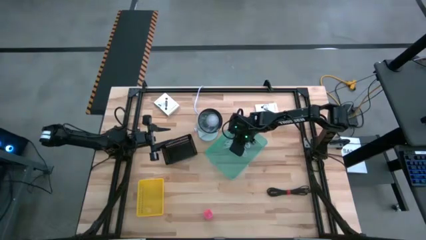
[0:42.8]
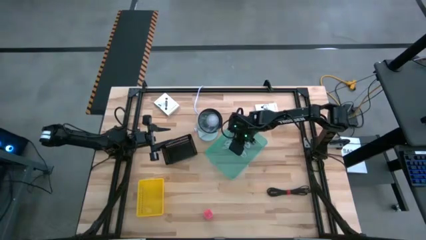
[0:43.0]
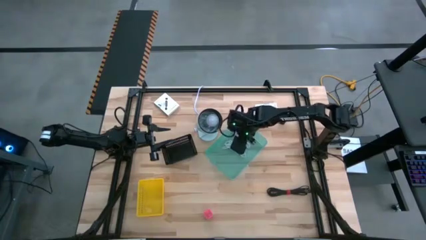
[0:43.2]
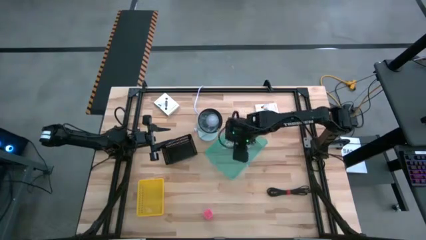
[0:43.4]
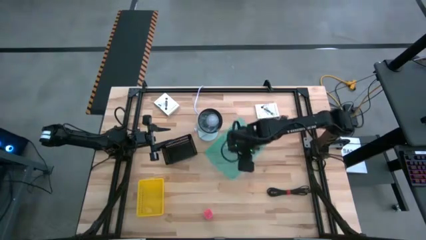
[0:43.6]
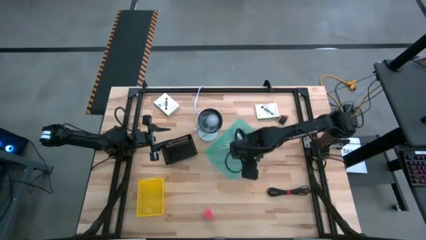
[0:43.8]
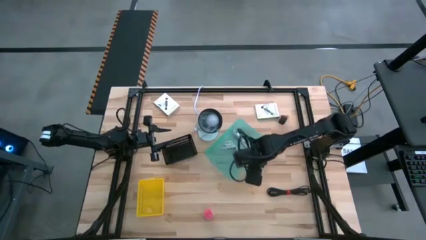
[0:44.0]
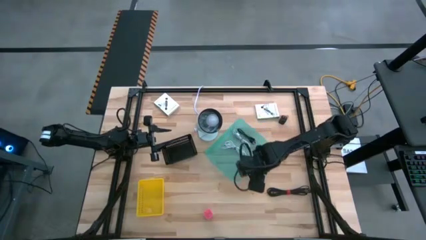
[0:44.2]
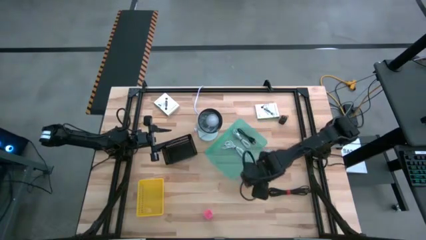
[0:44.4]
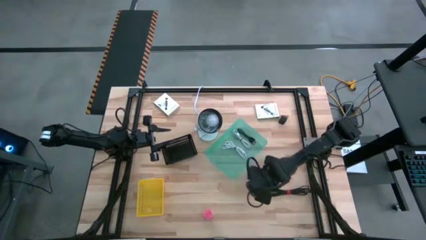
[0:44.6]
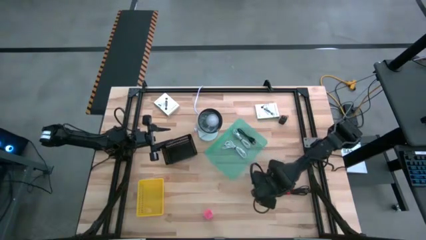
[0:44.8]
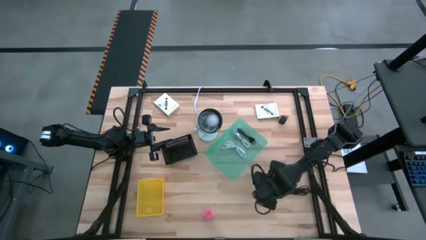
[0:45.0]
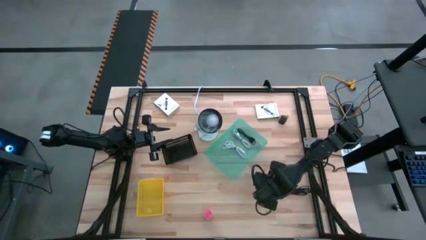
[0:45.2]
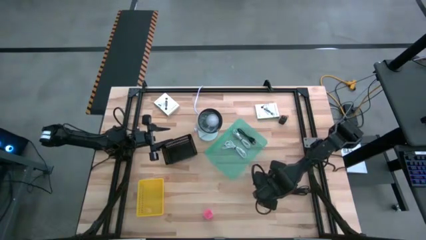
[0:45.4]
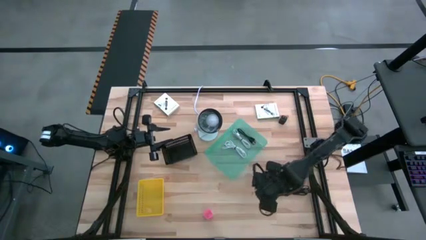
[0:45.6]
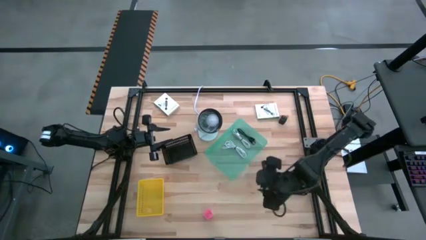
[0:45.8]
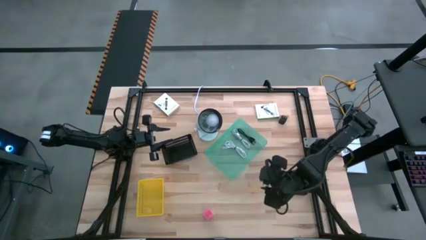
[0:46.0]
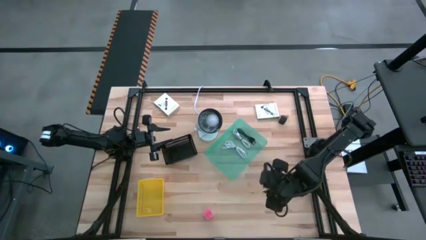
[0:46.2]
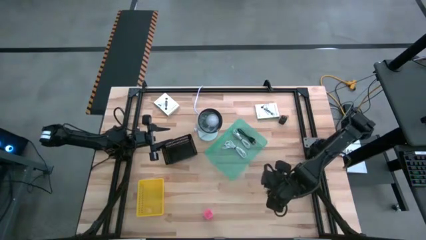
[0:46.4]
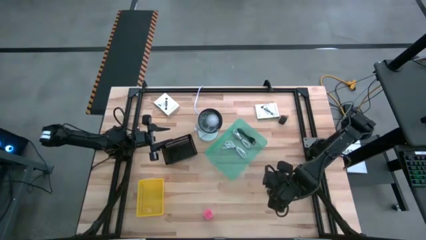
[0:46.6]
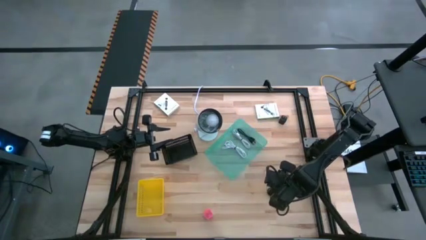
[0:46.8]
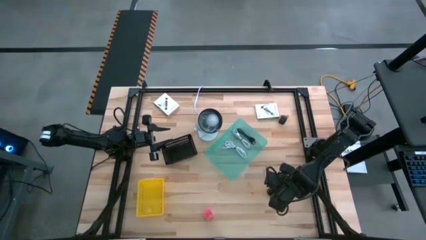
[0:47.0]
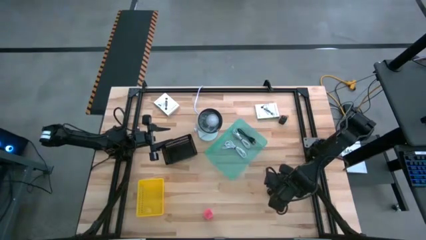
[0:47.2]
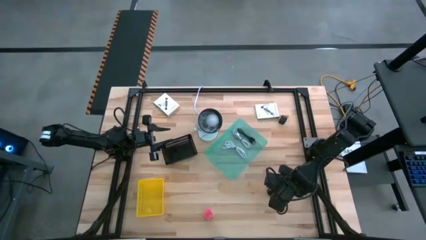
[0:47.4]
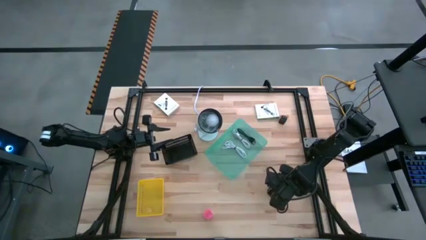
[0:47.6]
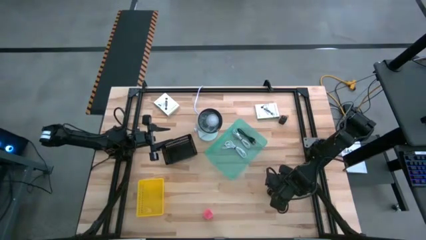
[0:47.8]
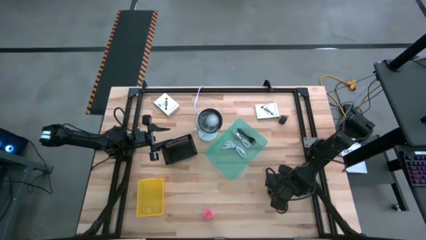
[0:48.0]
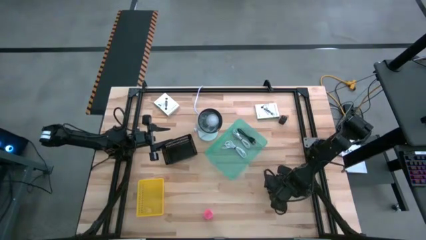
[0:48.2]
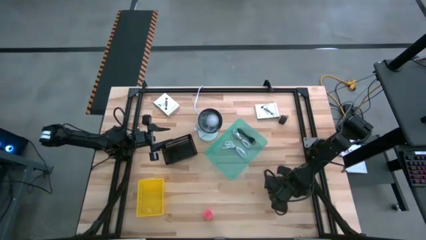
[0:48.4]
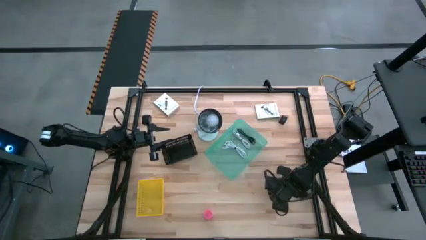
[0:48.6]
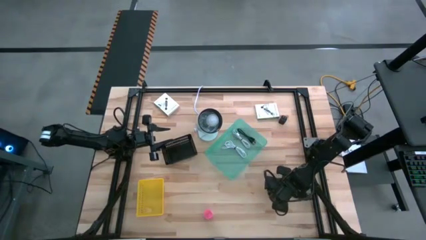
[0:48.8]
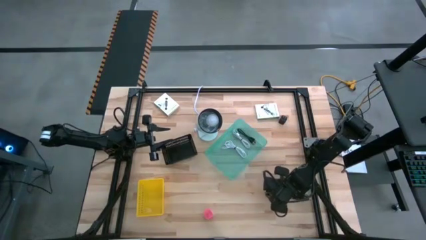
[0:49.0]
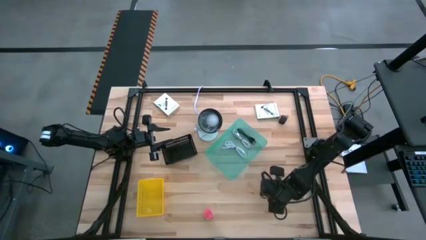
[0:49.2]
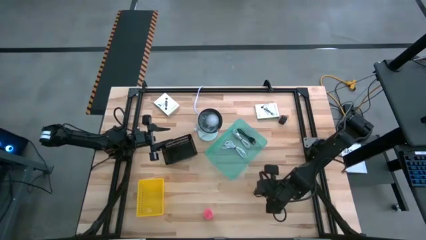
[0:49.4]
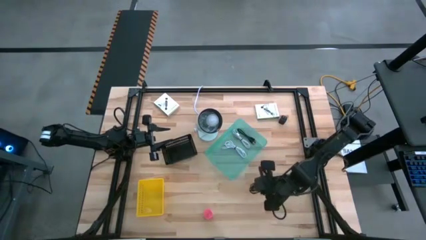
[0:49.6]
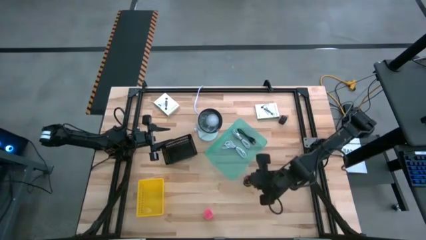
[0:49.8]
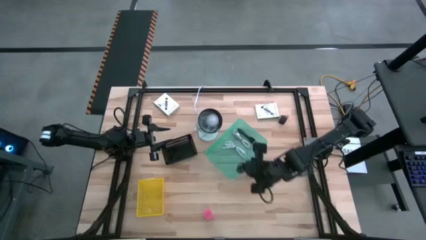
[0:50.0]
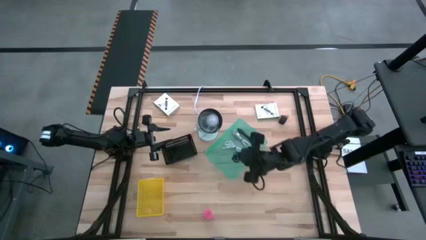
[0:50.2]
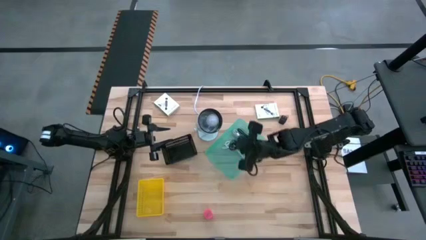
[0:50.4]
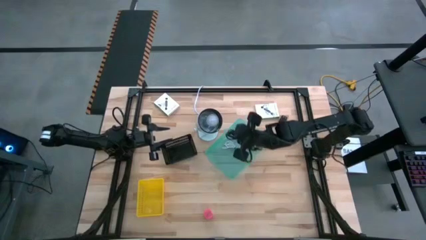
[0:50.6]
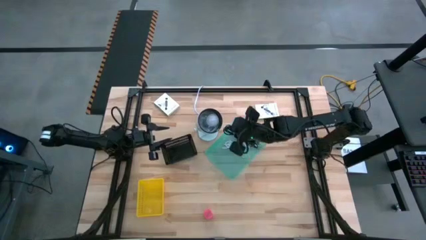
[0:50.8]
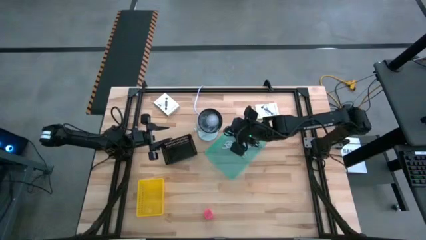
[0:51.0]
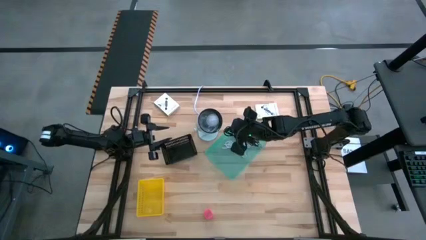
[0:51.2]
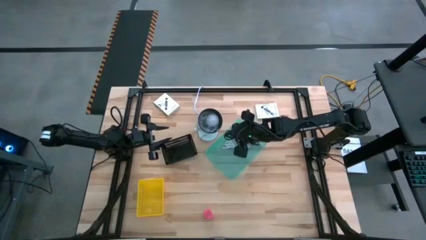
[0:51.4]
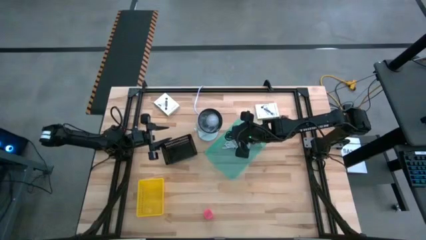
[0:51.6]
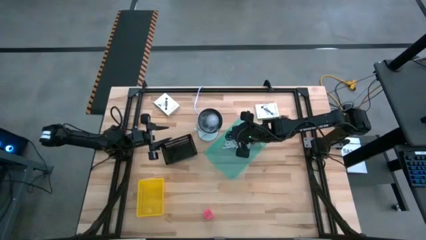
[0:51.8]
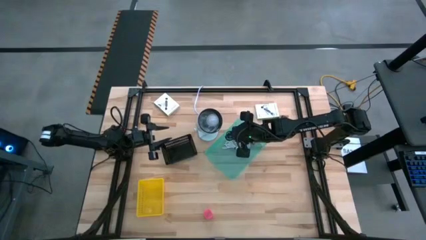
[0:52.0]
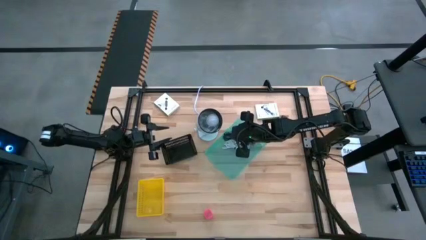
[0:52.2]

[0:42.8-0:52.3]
Task: Pick and place items into bin
Put the black charger cable into the green bin

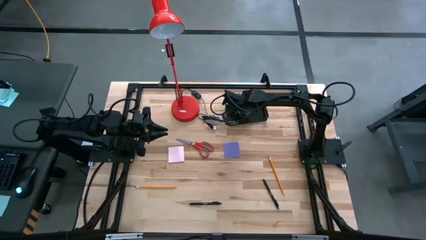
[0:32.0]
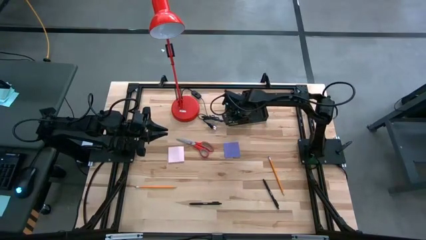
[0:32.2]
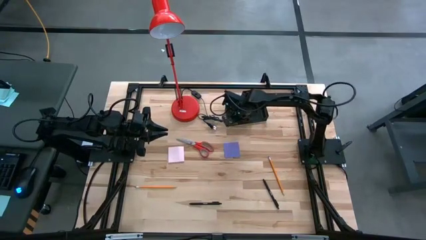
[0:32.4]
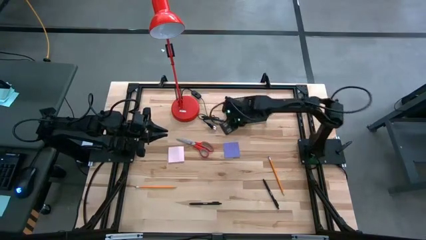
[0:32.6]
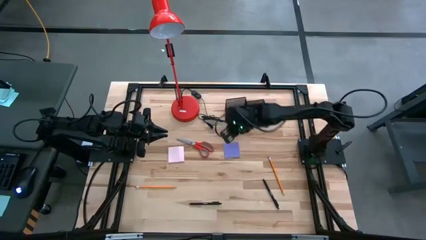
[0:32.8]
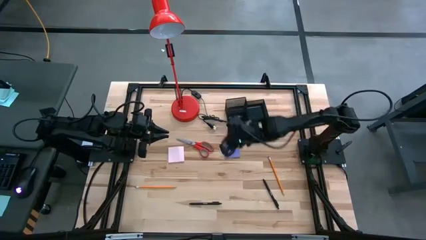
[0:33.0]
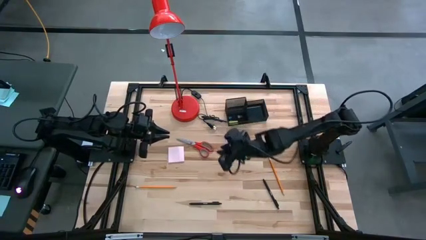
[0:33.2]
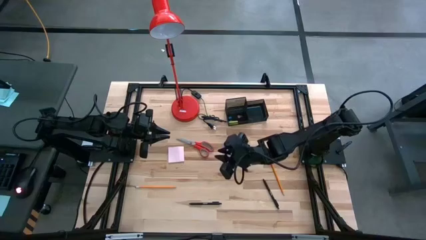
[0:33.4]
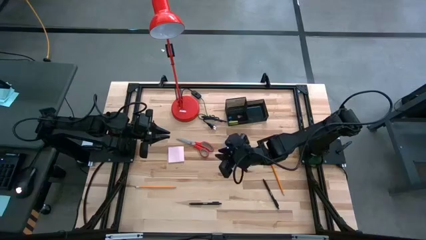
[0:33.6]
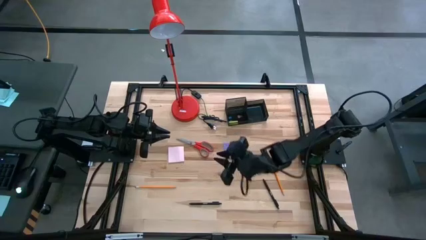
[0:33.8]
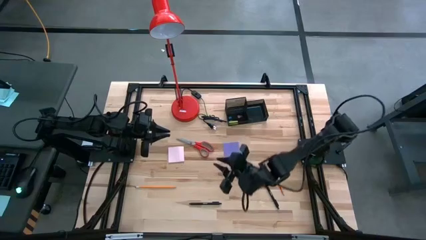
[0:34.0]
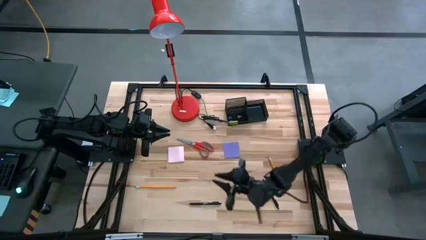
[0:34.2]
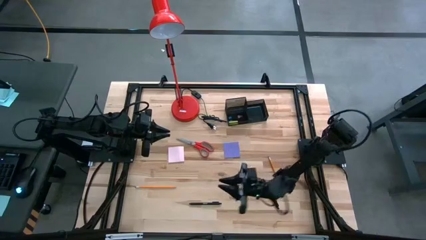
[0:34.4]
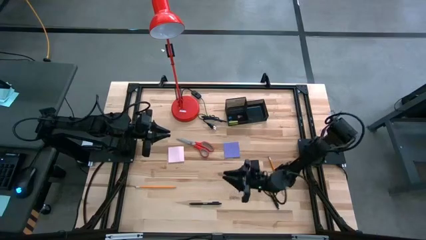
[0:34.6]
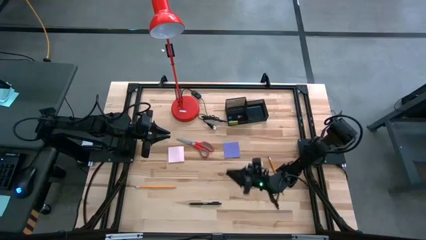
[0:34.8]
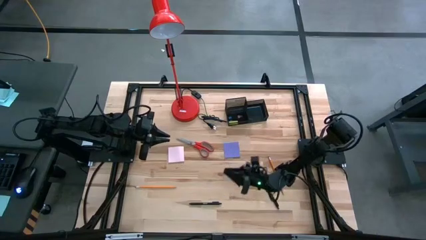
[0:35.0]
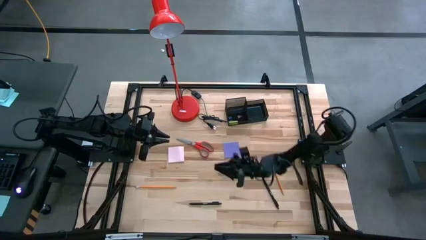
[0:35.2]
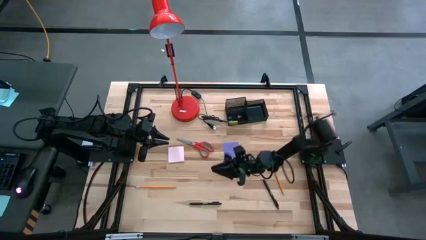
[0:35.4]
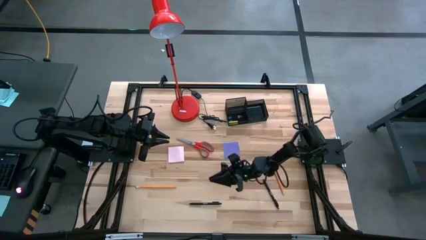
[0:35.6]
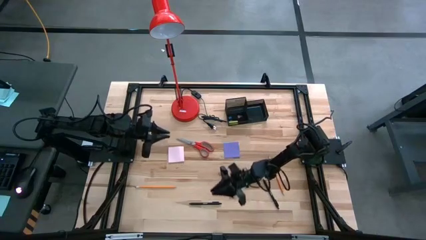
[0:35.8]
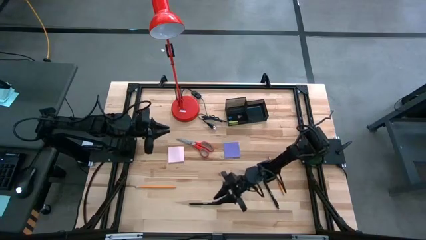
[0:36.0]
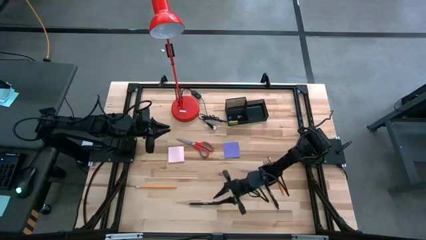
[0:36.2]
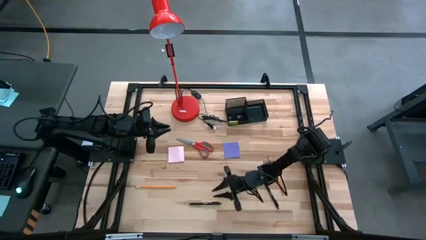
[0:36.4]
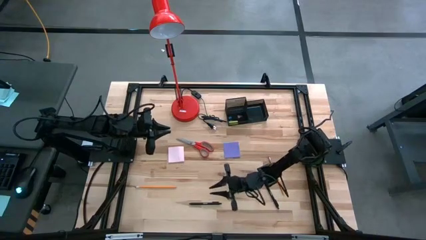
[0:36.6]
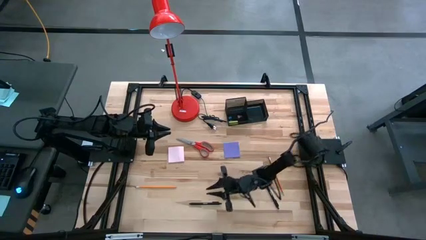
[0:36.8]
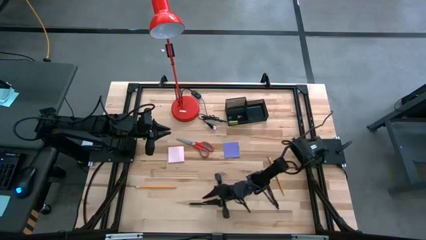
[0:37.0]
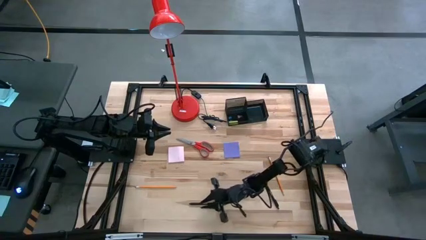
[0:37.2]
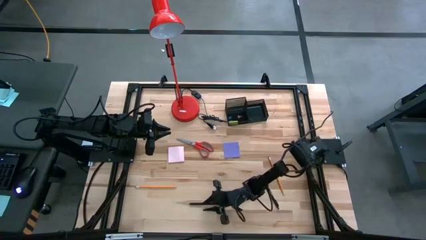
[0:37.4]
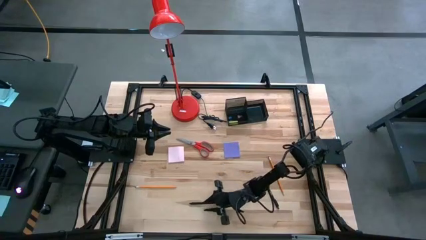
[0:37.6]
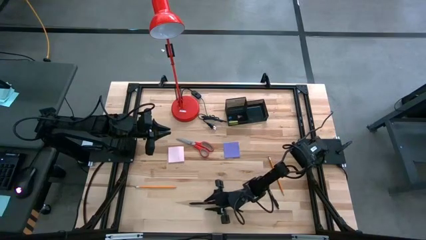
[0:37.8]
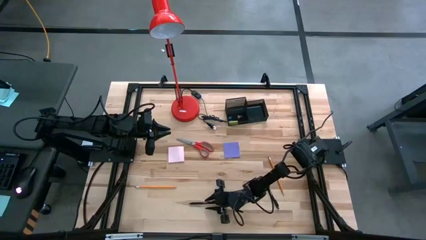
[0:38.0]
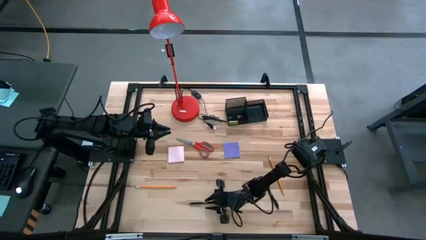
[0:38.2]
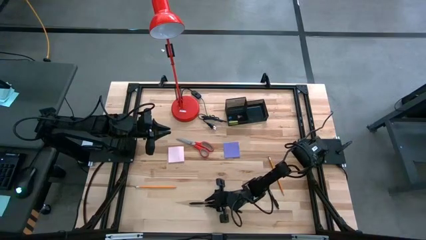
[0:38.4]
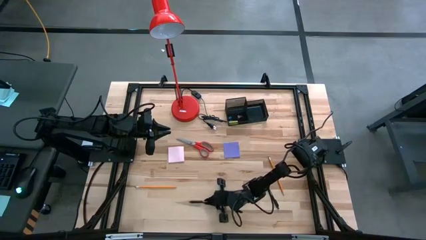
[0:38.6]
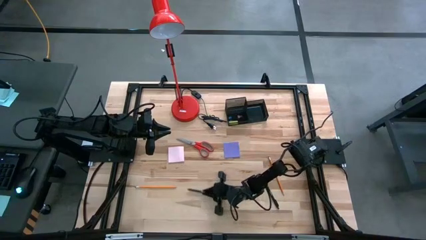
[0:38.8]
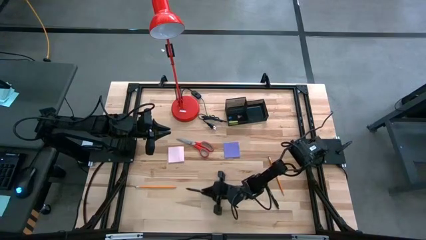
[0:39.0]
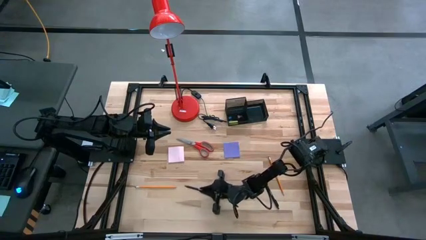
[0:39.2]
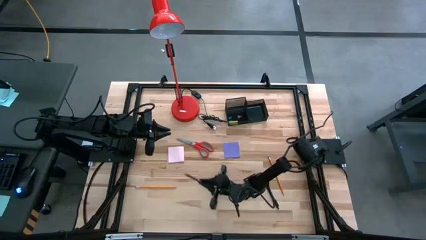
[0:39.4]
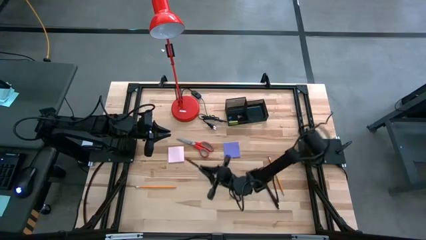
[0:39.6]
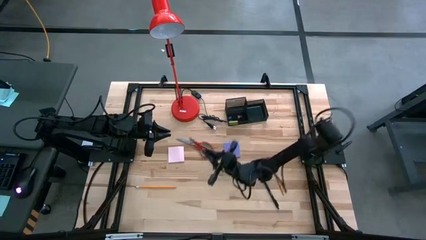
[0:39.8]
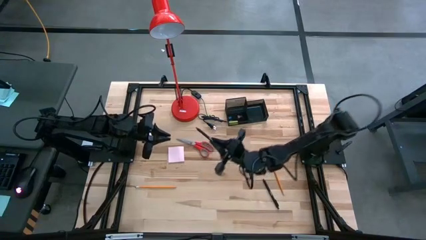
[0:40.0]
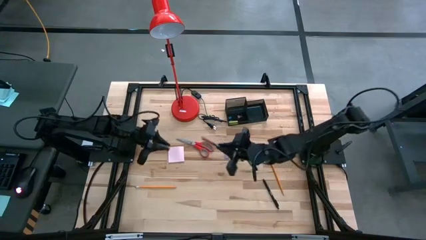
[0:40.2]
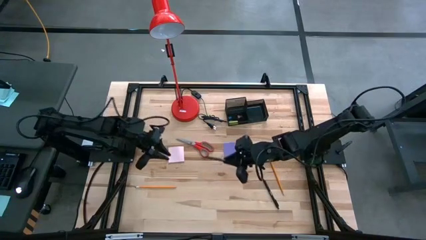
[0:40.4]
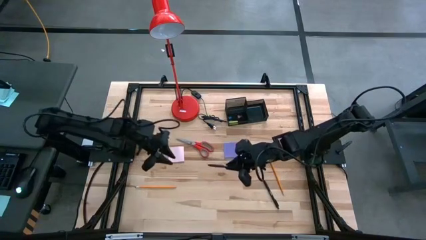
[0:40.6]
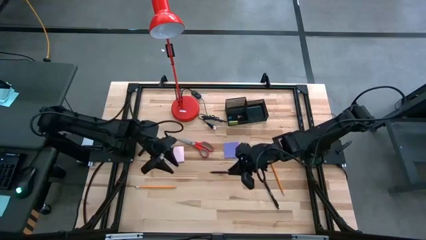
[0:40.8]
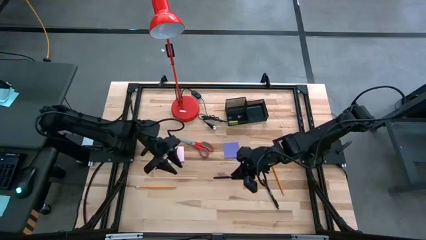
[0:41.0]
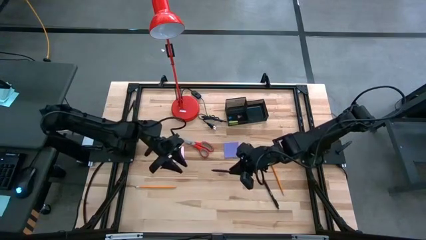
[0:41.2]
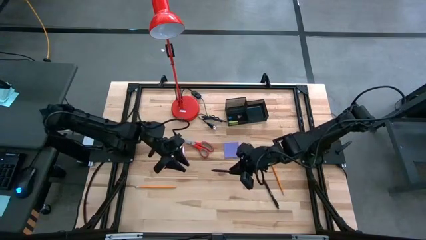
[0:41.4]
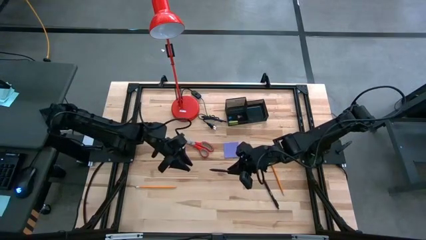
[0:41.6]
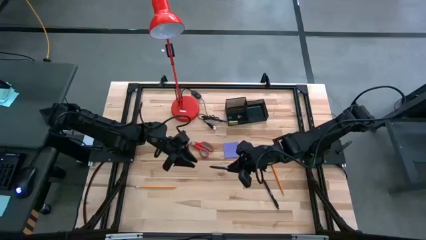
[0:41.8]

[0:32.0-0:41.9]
Task: Pick and place office supplies into organizer
Put the left black pen into the black desk organizer
